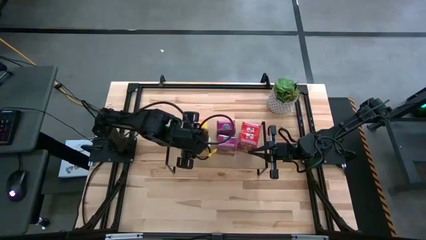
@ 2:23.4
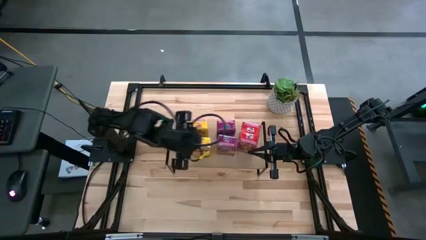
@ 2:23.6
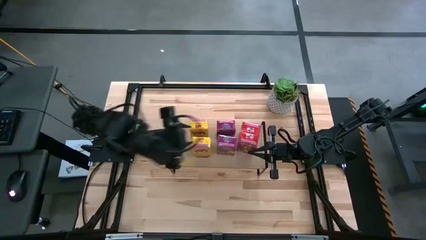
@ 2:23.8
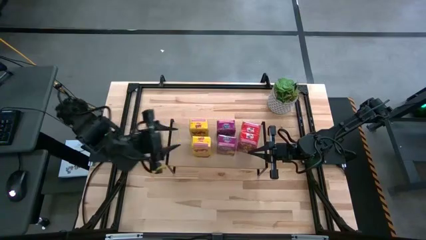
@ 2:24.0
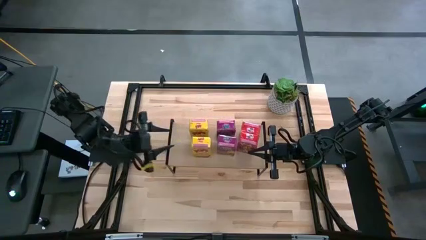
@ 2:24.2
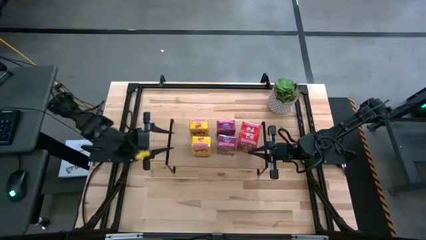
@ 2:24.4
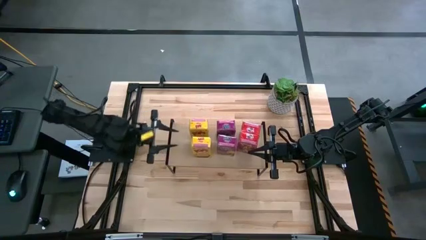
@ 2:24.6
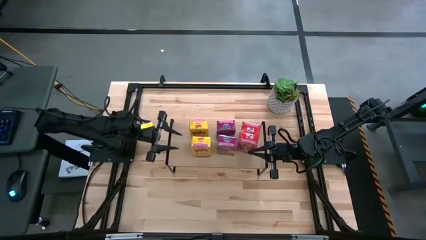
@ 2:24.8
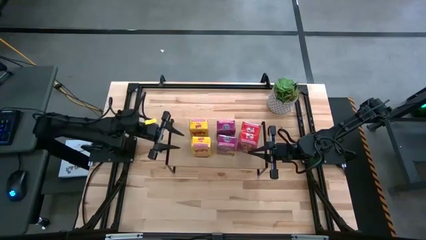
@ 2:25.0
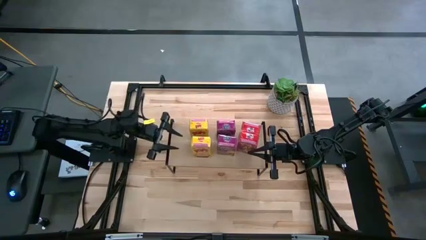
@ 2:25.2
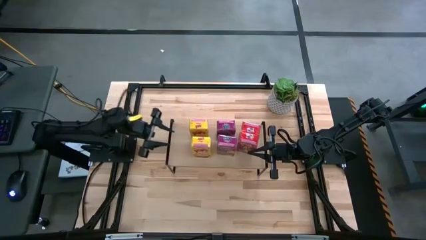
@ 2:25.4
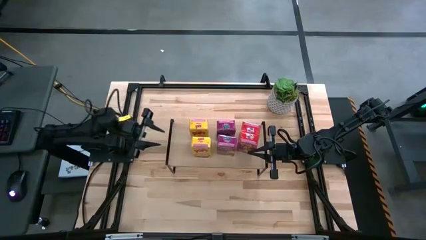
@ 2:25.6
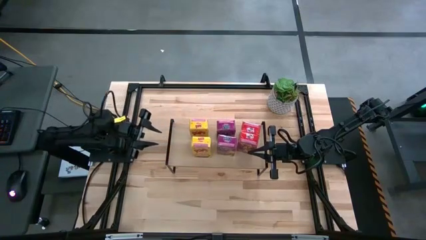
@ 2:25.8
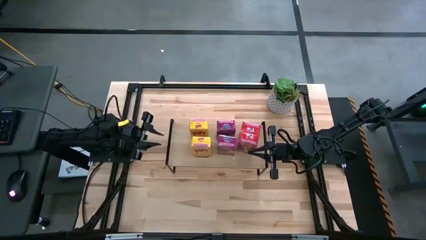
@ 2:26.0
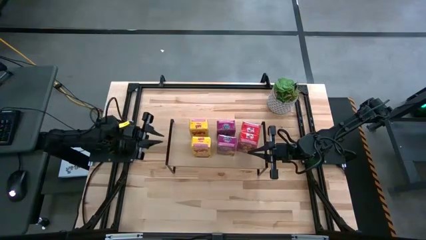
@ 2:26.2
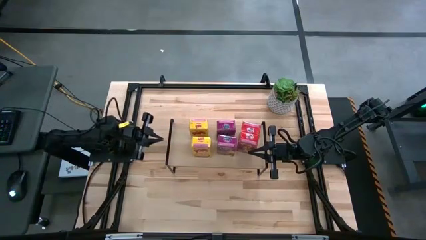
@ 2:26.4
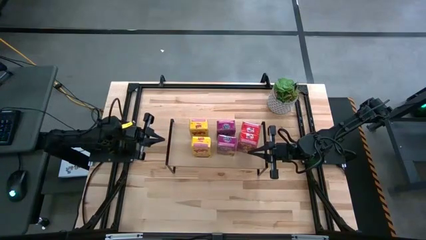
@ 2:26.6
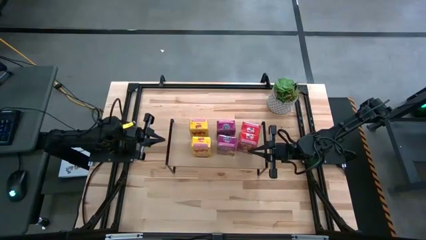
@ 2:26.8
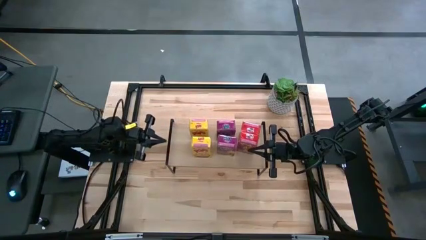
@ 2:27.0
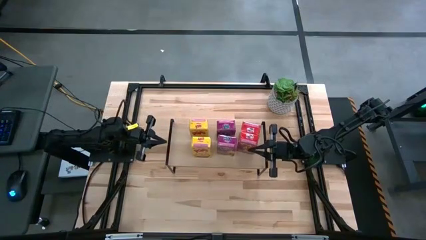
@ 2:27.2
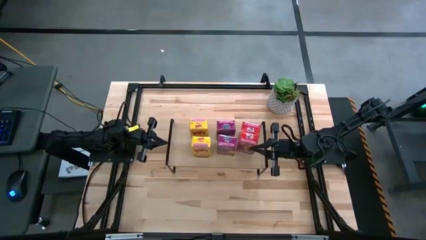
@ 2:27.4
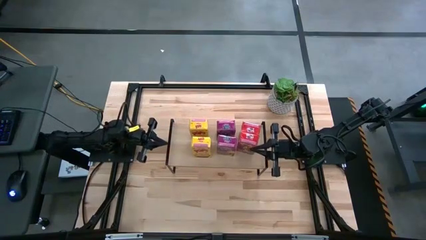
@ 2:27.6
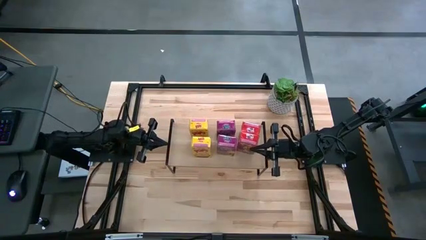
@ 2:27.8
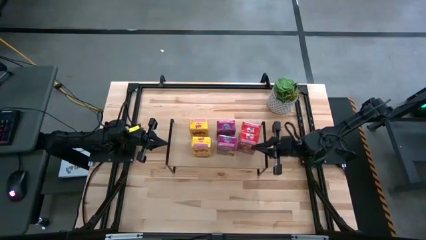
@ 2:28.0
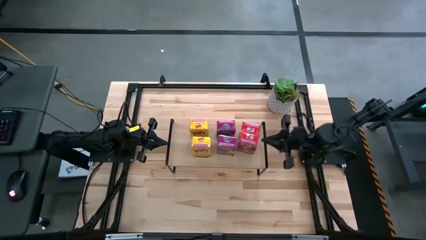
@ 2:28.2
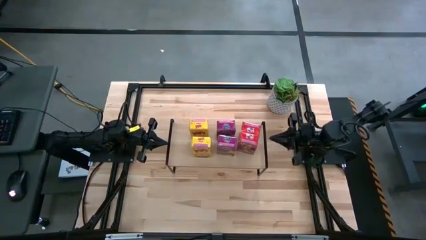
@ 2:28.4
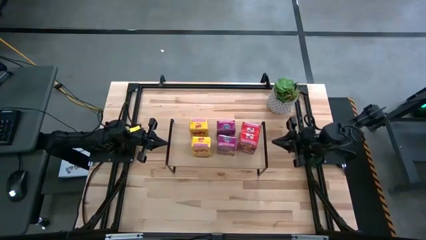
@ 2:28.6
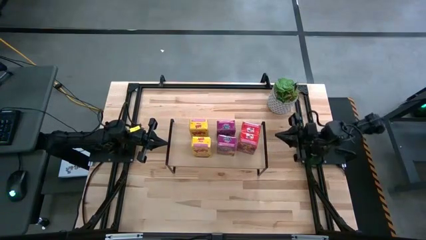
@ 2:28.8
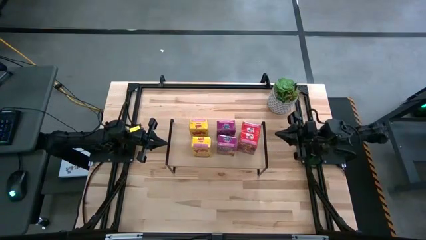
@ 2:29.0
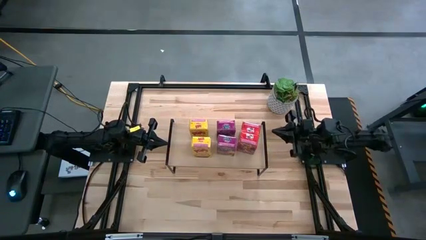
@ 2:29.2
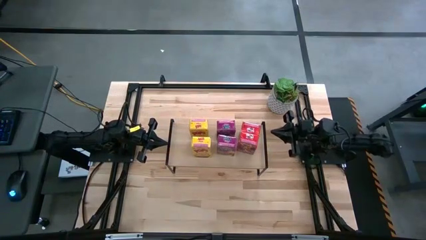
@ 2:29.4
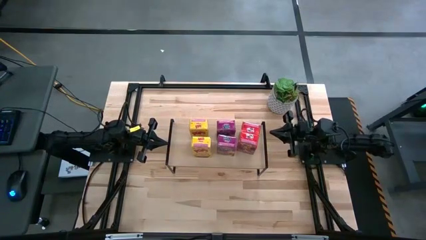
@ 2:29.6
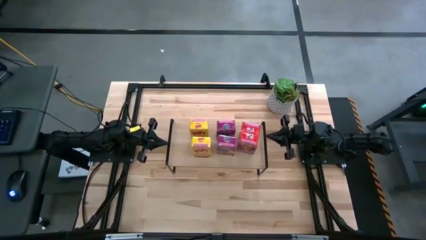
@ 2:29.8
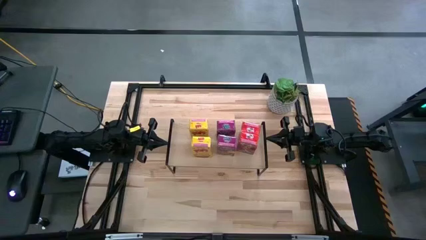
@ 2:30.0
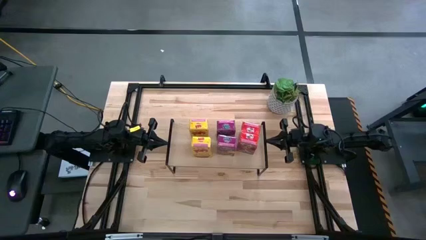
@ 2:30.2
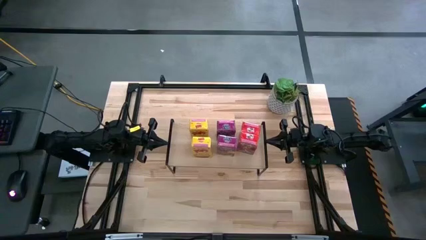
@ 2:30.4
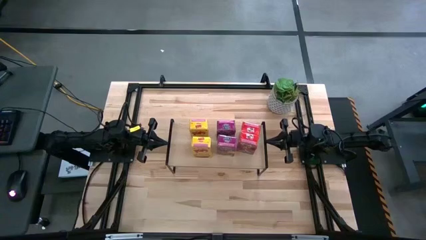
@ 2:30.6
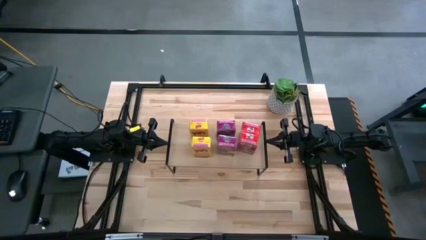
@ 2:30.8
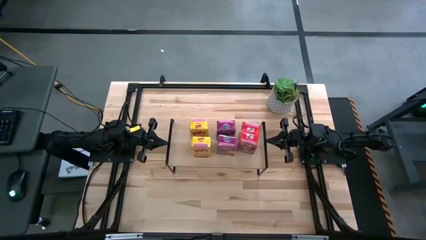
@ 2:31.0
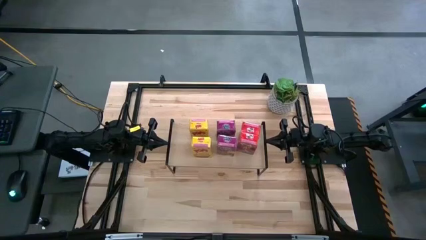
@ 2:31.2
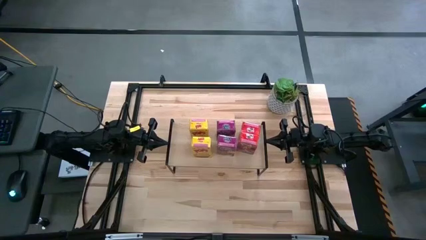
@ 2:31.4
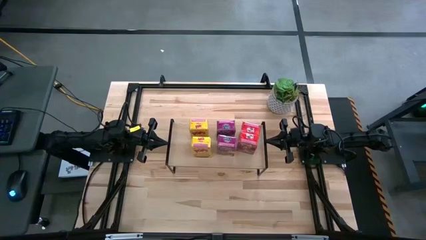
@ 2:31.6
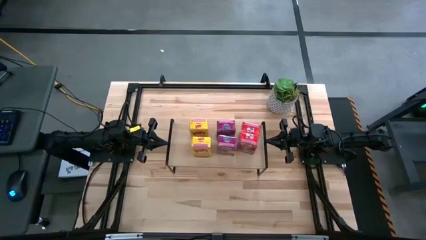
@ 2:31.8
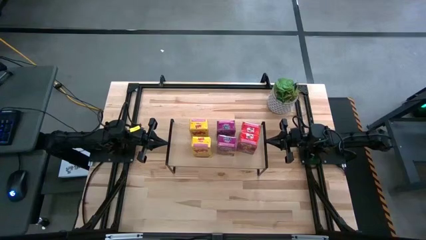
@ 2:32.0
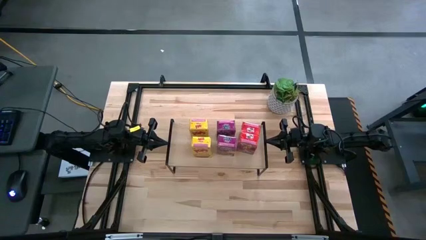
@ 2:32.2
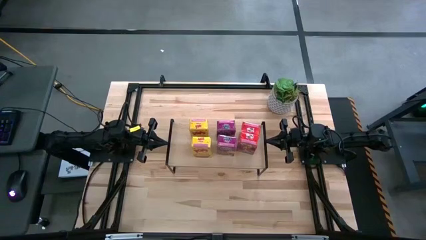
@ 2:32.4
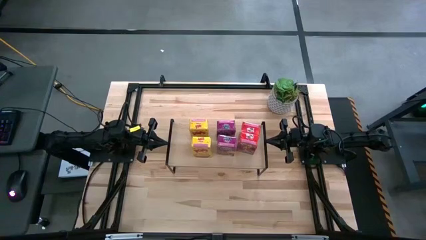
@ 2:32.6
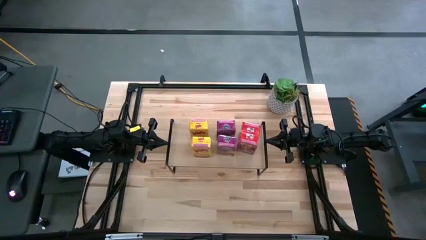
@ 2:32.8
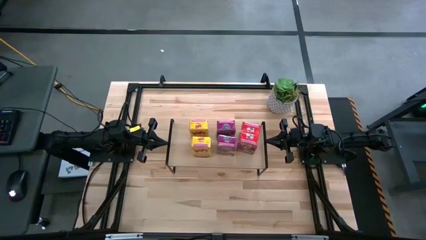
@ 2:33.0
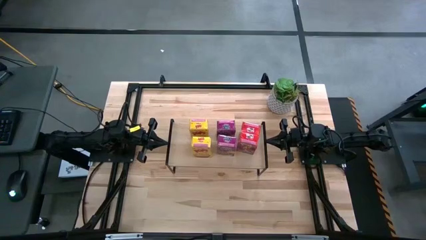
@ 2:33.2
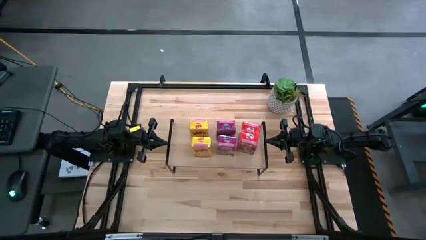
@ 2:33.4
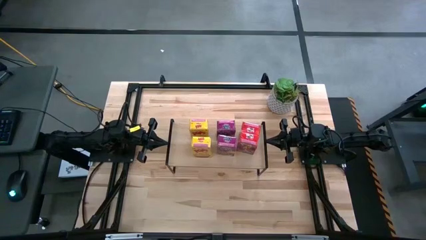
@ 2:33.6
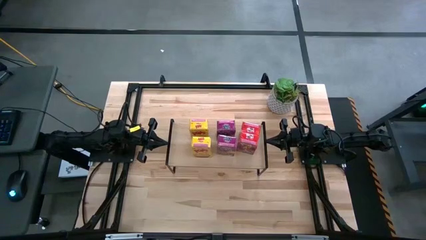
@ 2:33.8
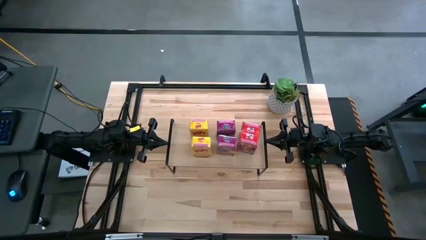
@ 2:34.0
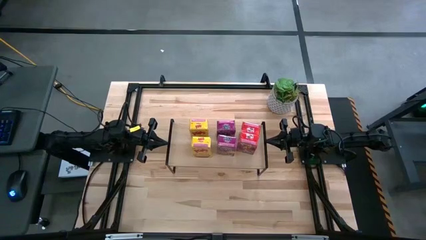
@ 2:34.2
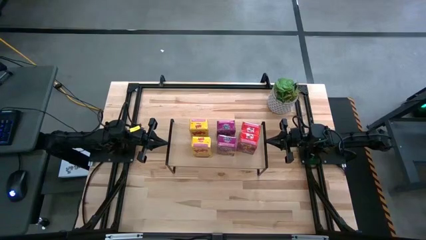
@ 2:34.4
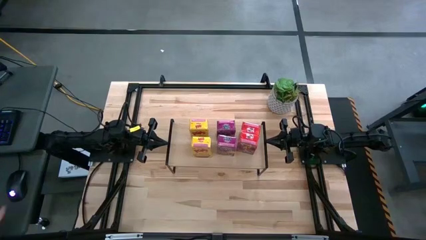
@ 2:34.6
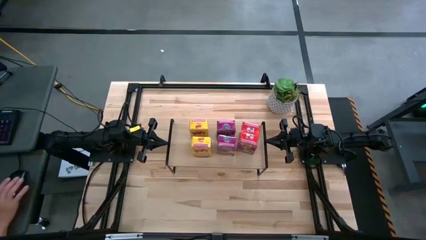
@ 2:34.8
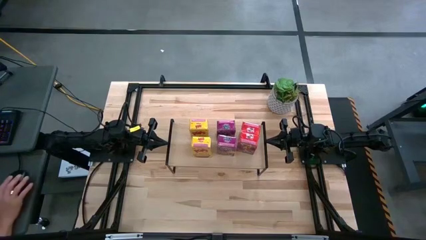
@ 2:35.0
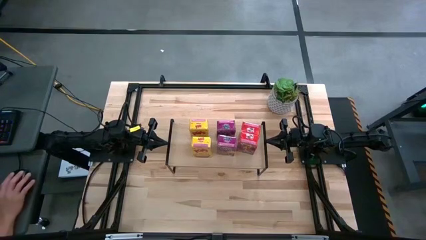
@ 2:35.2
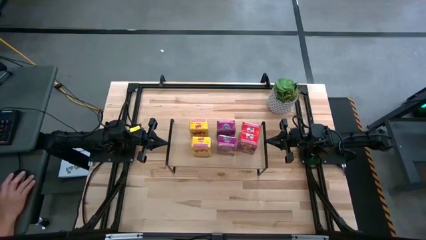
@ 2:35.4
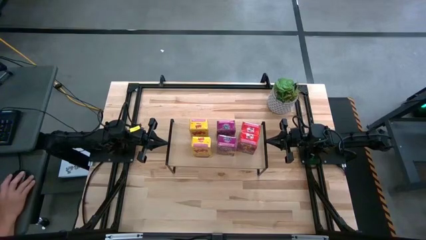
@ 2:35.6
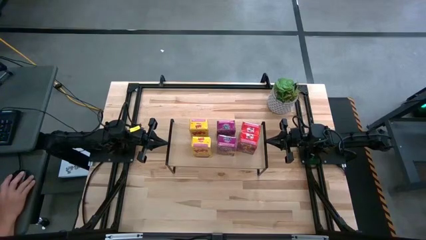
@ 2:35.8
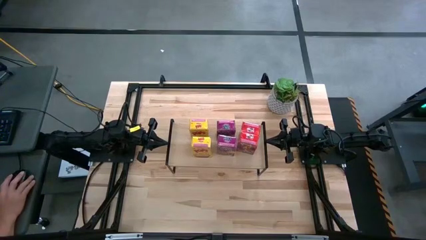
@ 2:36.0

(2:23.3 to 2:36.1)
Task: Stack cereal on shelf
Return to Home Position

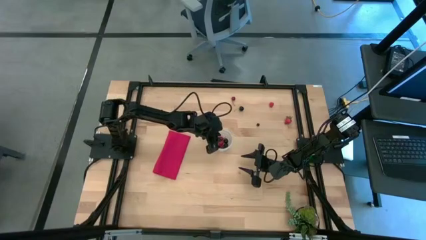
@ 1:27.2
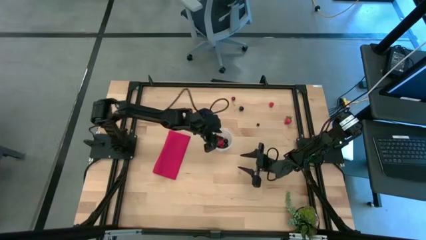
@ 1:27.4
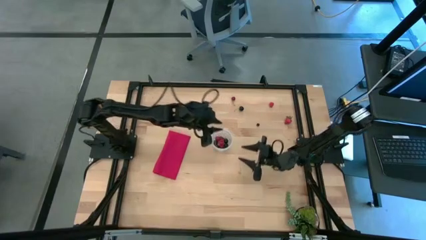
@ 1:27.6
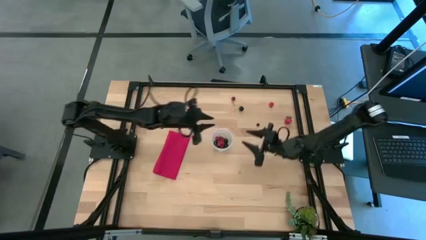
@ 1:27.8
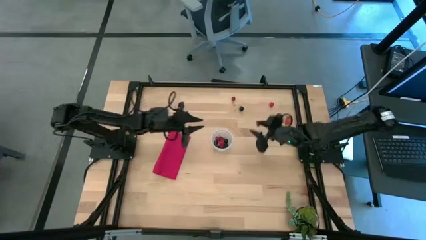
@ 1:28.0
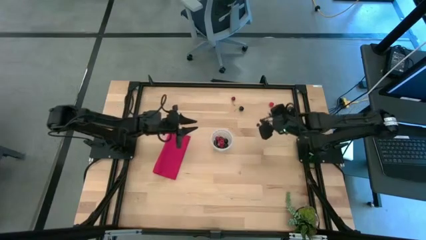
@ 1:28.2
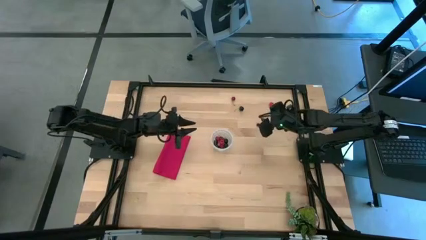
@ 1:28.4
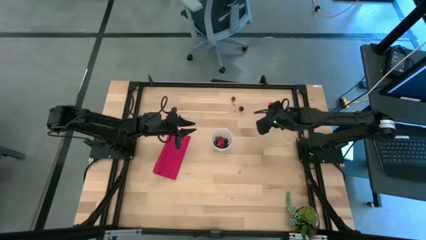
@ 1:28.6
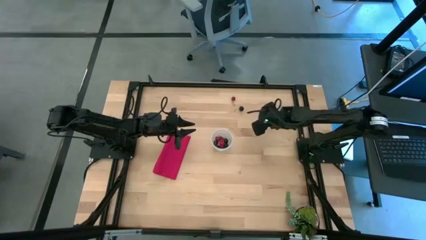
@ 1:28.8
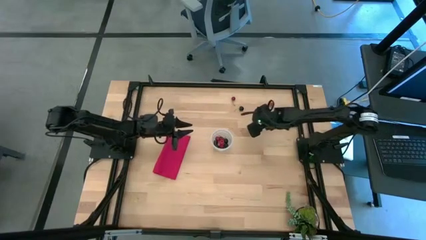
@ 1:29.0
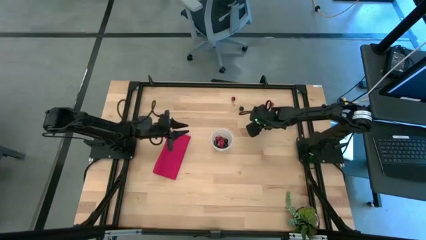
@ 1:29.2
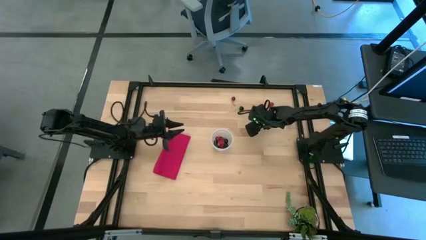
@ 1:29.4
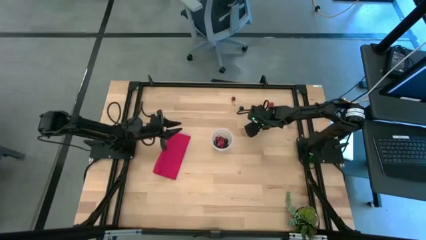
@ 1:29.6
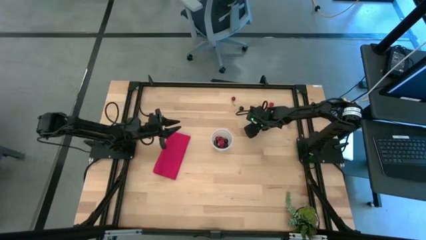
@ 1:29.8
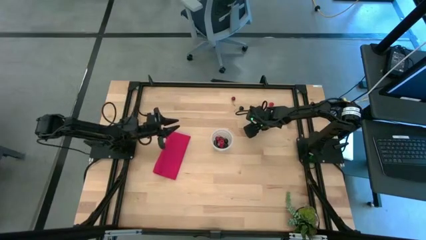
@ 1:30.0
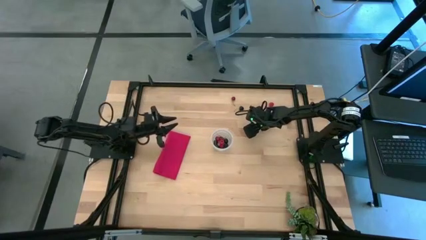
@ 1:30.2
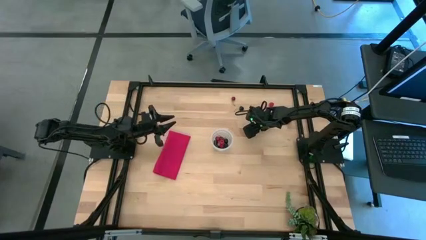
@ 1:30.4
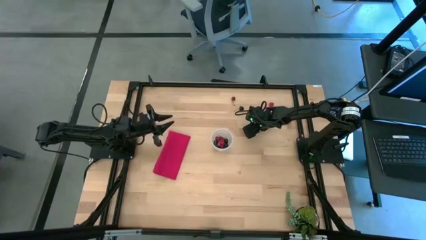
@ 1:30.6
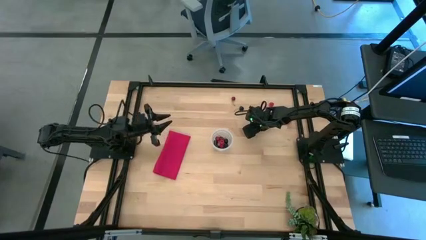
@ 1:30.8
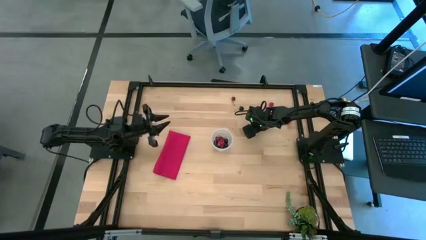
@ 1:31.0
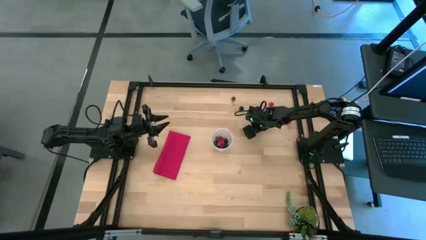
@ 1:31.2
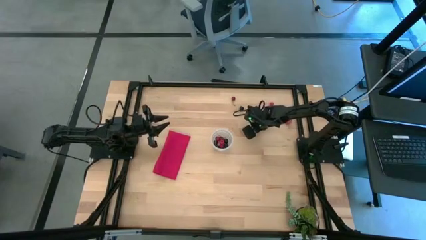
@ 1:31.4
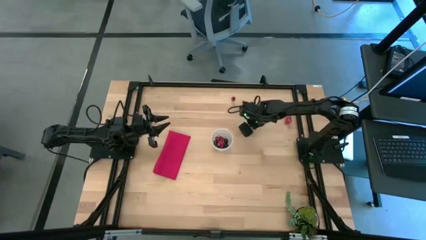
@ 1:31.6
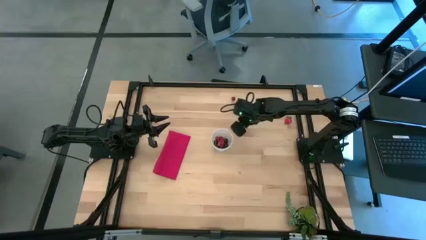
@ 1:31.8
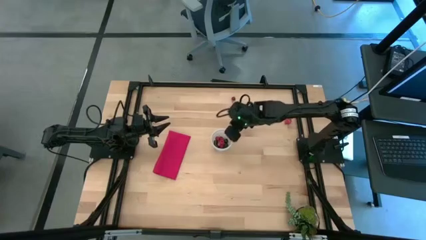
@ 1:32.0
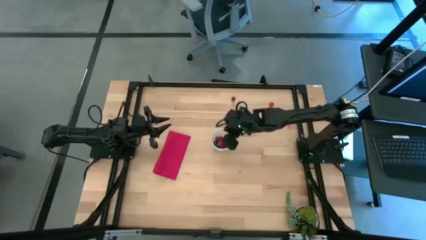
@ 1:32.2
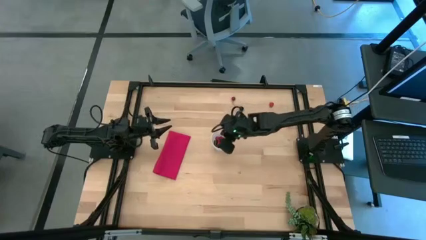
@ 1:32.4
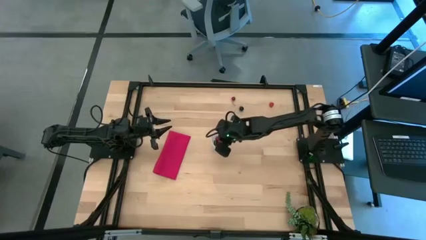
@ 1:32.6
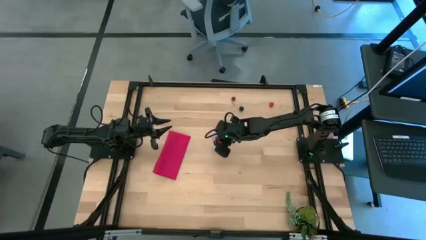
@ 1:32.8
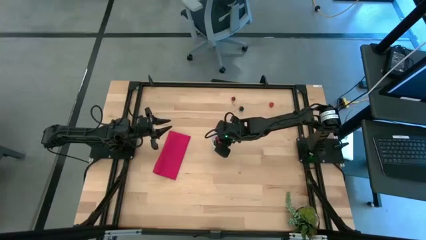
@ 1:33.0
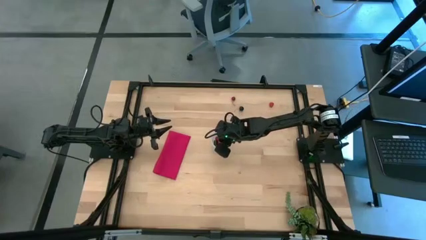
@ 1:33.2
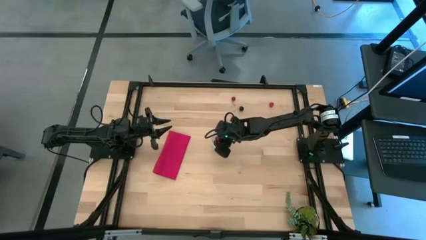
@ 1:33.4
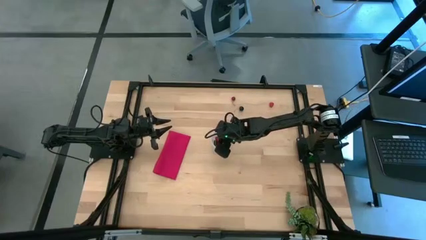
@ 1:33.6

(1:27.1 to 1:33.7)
Task: Pick and placing Produce into tupperware
Put the blueberries into the transparent bin
